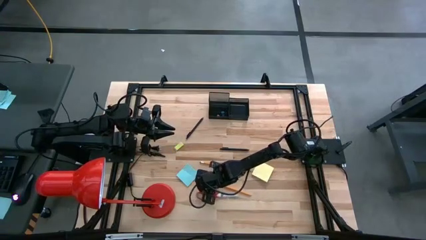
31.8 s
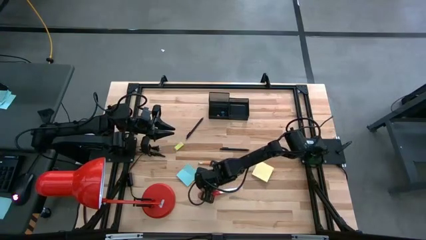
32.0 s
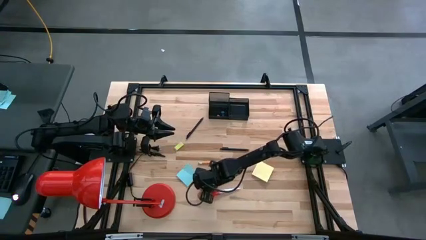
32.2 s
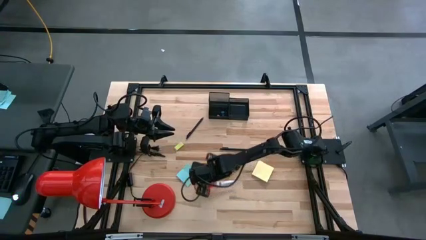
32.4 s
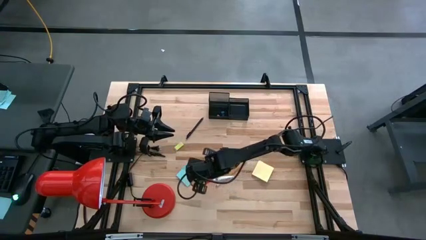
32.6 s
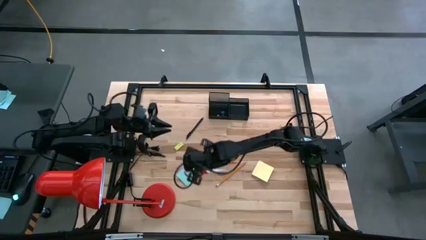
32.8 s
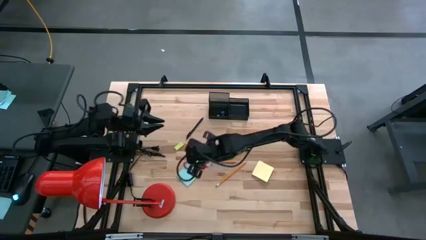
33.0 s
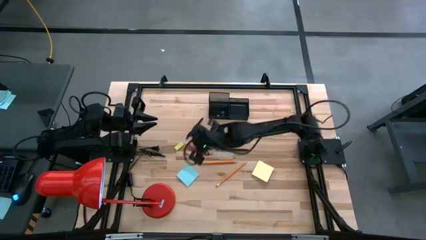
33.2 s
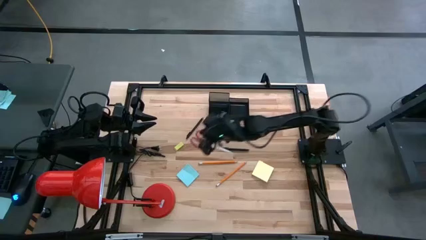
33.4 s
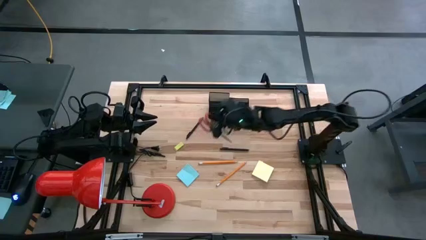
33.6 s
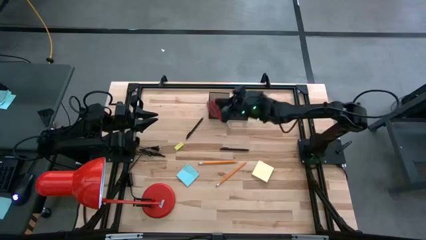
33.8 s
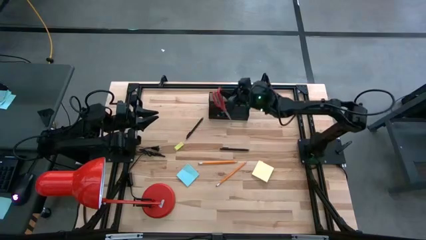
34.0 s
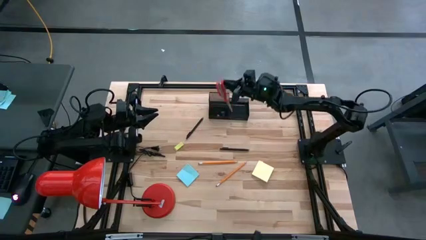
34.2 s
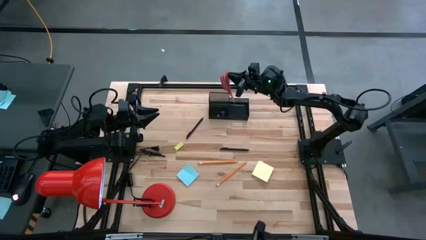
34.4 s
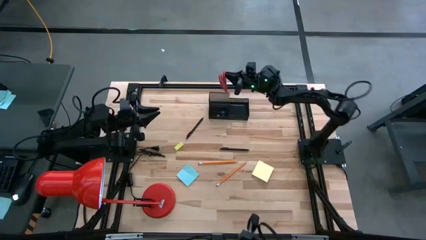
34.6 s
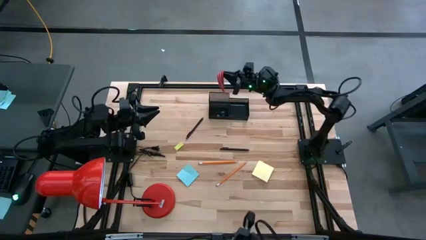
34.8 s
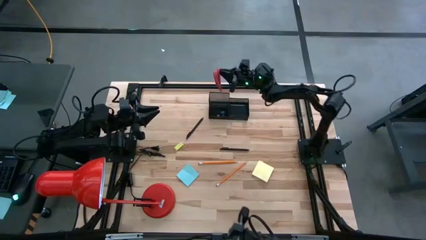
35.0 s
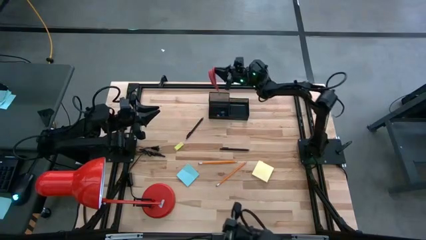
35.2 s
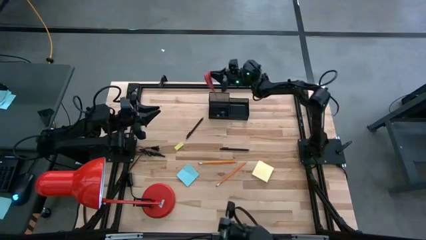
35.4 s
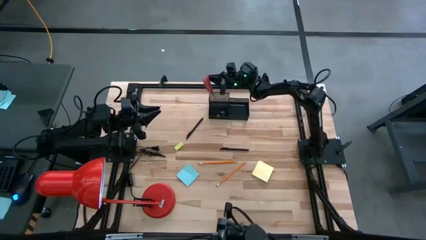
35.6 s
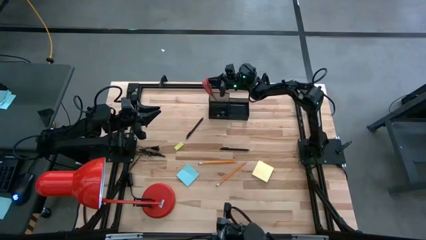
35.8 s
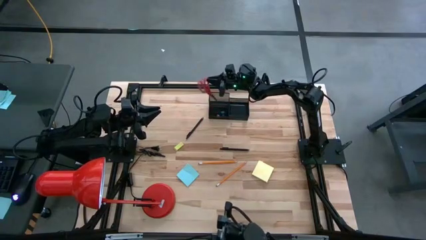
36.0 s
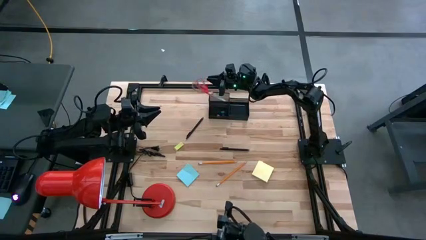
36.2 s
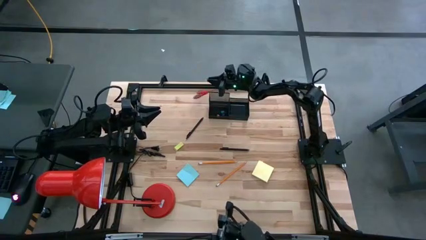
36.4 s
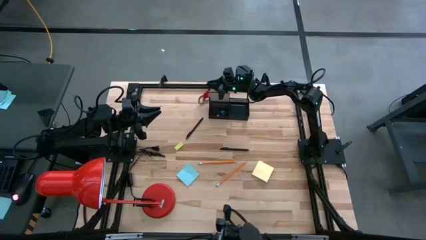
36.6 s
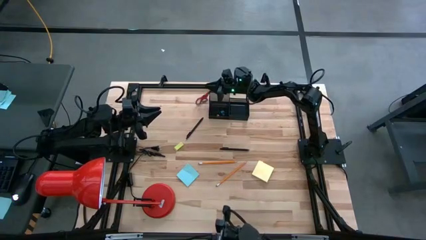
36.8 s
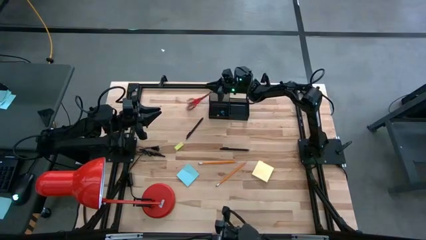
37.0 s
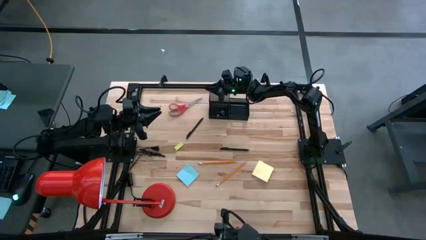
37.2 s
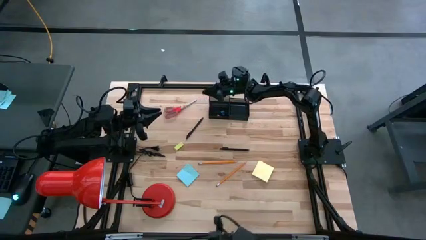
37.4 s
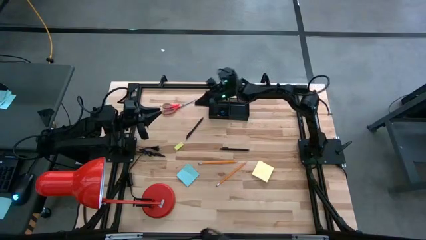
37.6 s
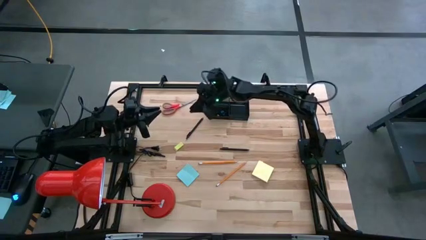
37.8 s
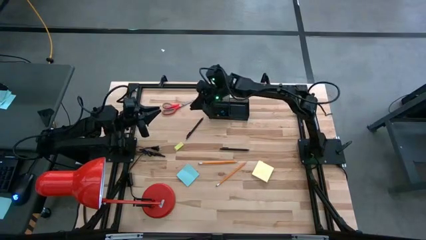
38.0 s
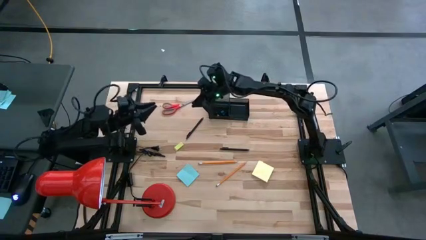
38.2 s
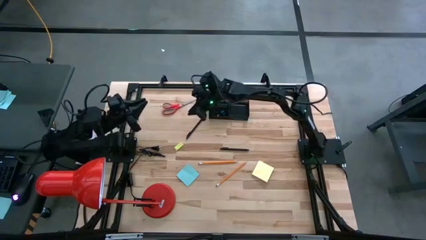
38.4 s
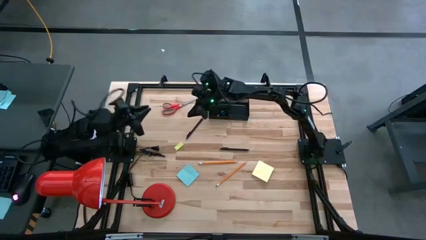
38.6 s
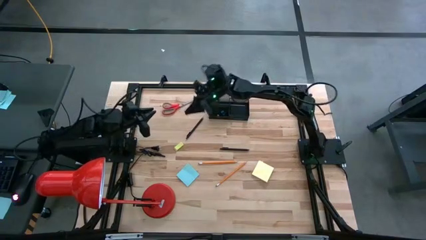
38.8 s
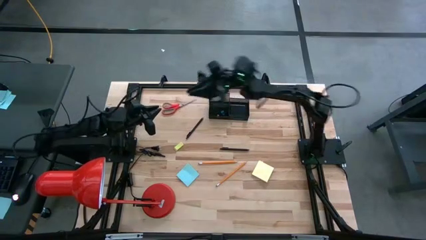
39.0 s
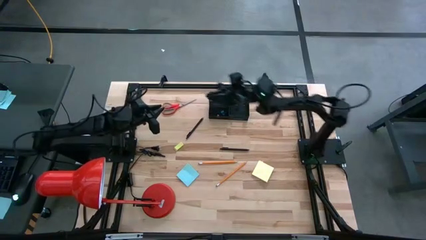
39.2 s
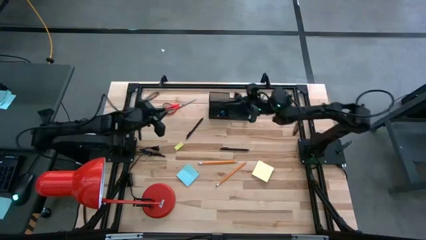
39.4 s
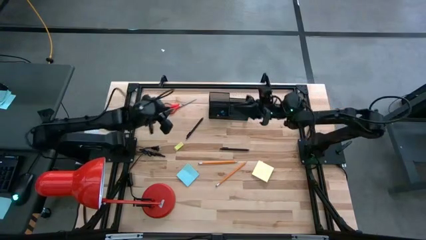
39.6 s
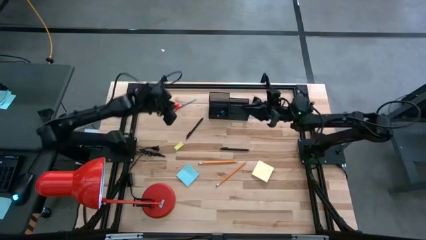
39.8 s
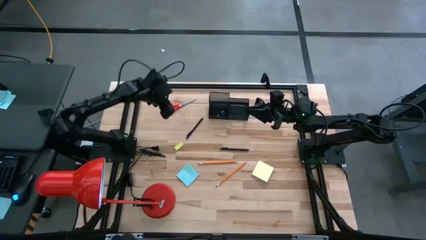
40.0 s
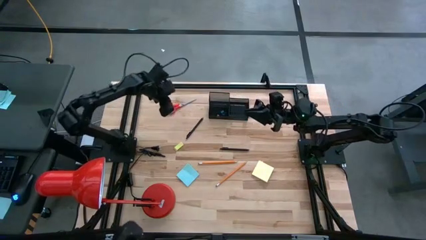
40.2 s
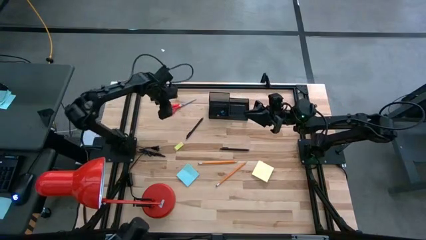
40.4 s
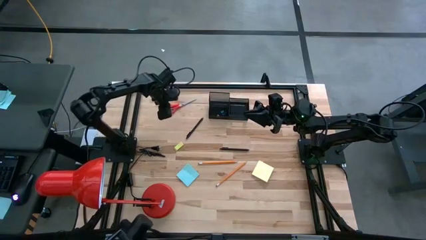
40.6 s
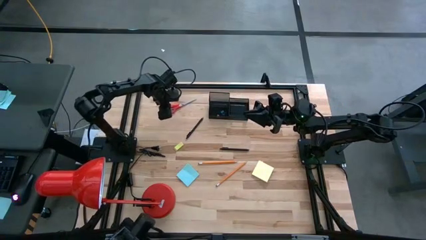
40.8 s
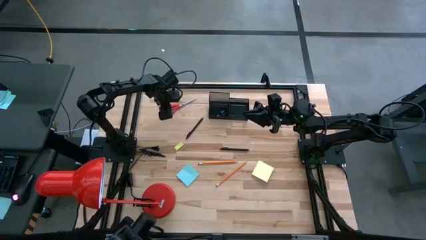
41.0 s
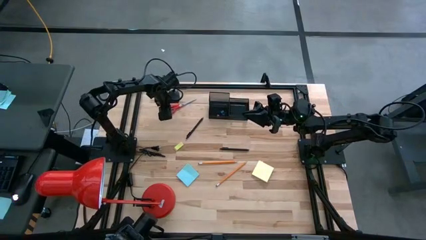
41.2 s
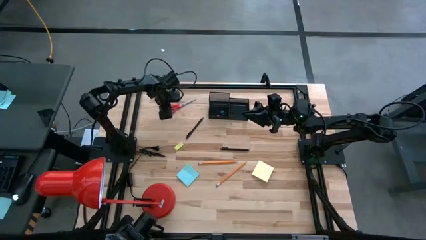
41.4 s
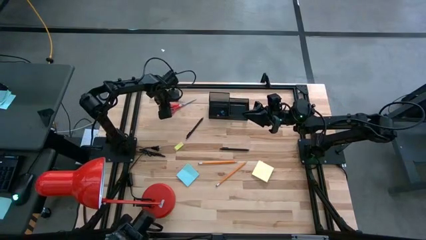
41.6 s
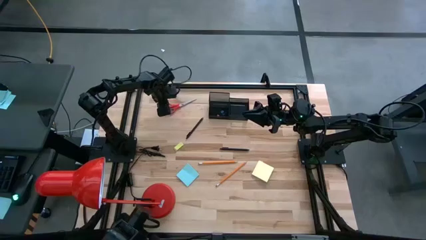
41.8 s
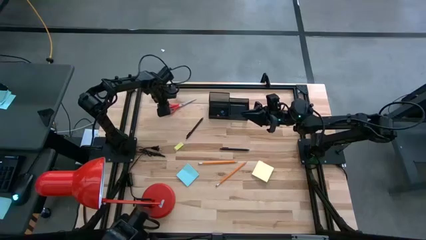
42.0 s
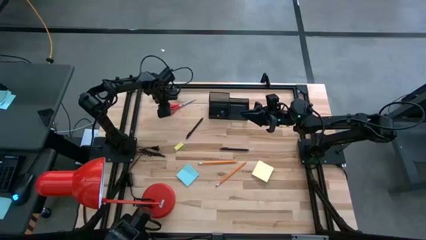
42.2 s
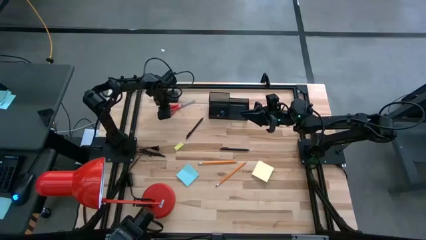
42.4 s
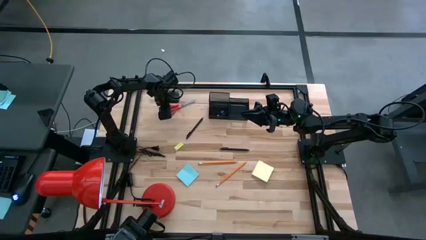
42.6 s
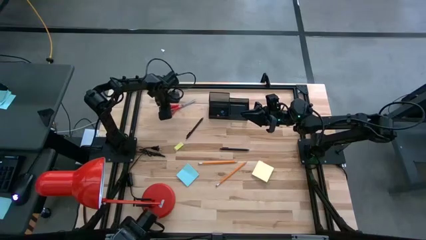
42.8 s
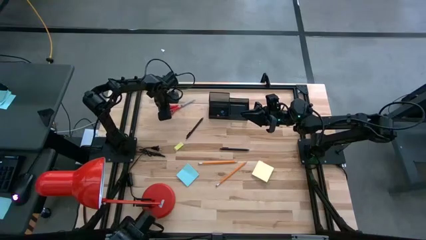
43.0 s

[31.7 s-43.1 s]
Task: Pick and place office supplies into organizer
Put the orange scissors in the black desk organizer

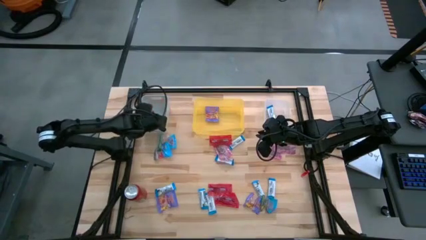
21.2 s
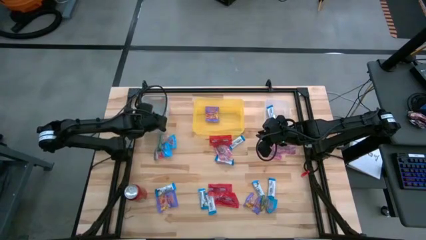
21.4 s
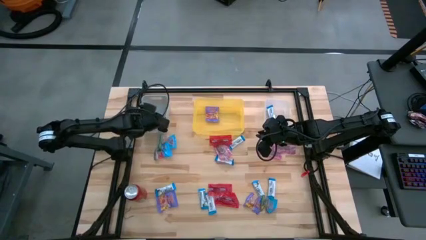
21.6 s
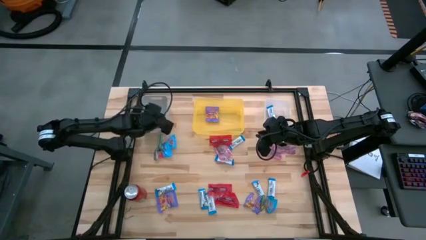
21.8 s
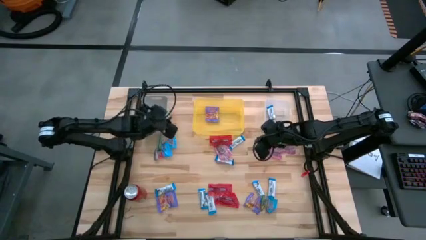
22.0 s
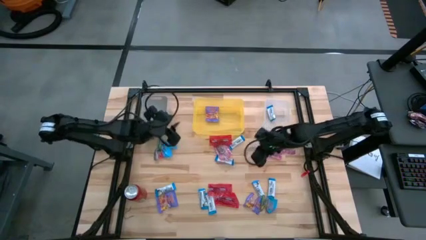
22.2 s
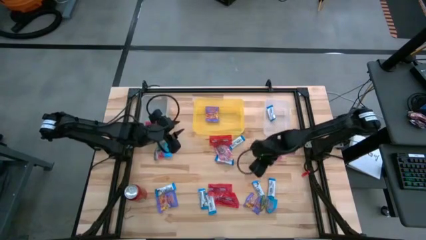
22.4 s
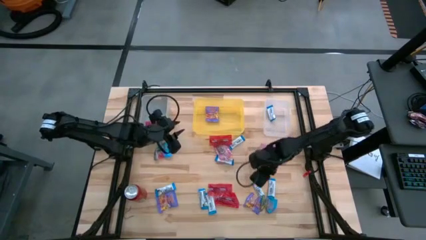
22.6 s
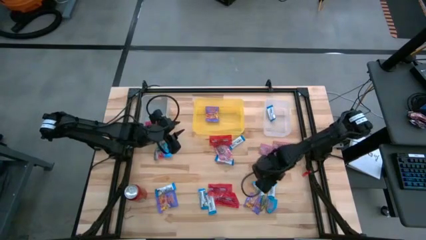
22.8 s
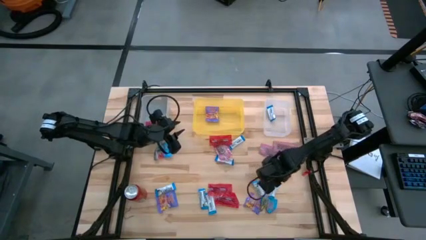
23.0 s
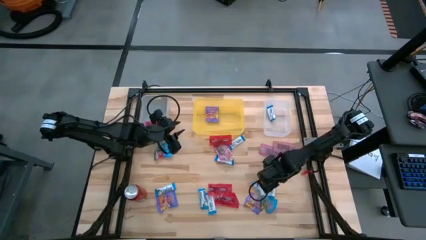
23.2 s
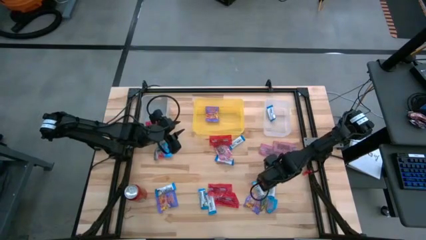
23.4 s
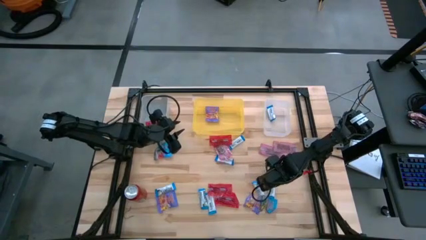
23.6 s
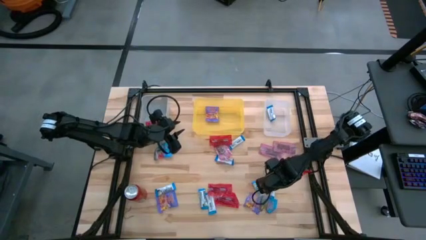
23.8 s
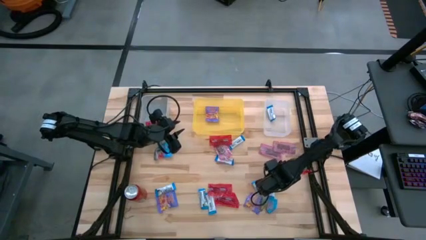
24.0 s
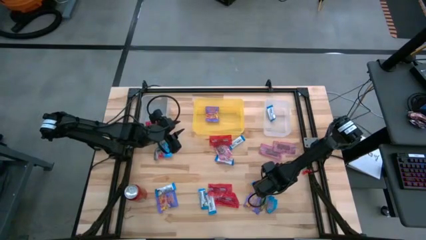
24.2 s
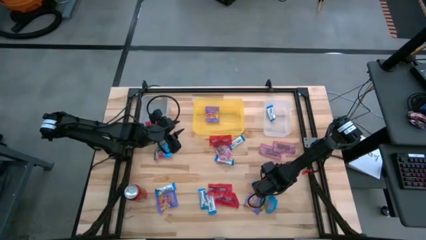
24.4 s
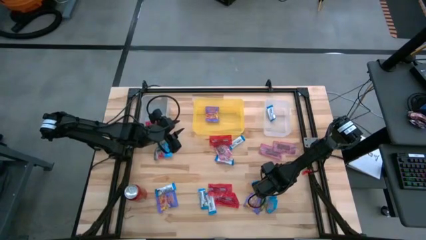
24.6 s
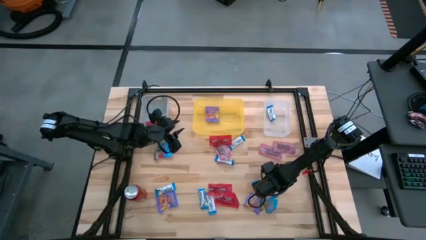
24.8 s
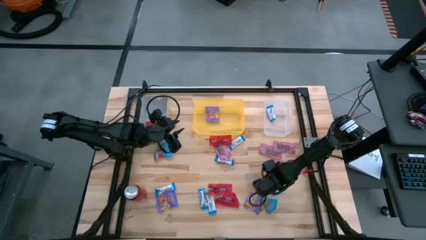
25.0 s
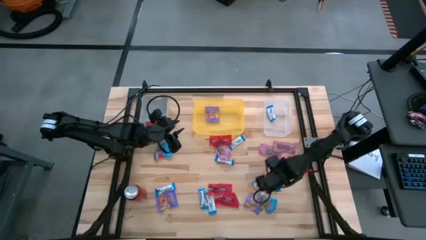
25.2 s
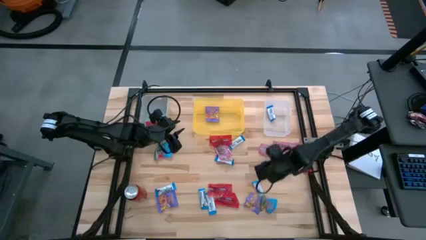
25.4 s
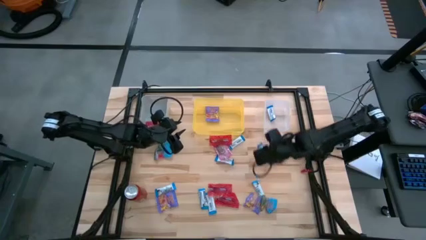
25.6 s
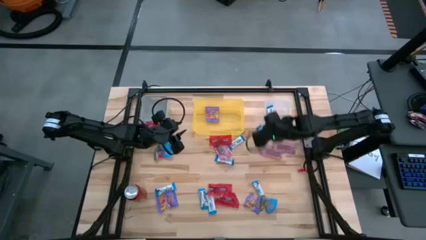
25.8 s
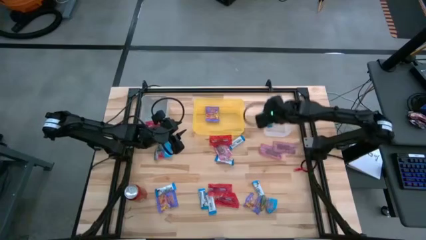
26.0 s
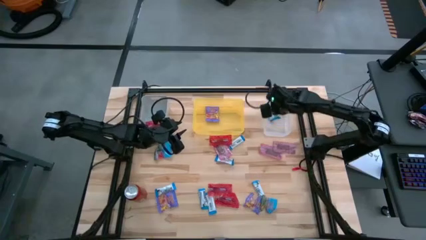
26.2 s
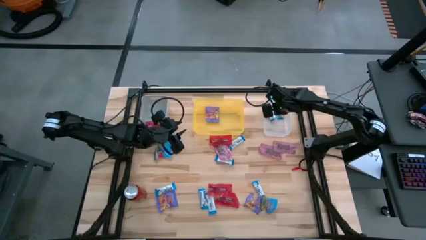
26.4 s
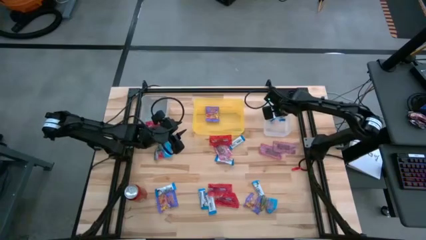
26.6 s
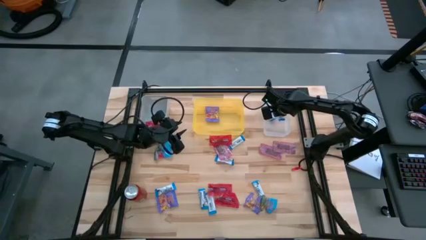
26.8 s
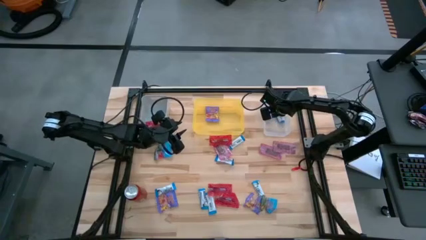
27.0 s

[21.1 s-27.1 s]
Task: Sort candy
Put the white chocolate into the transparent bin
